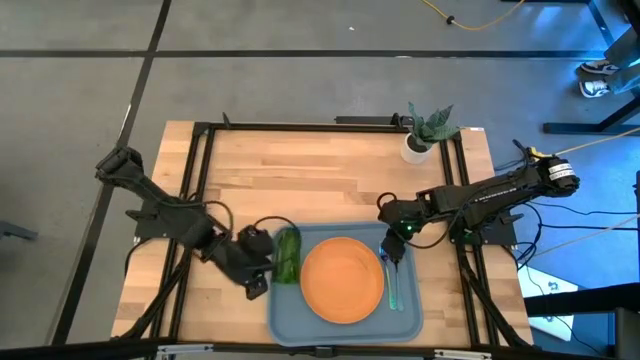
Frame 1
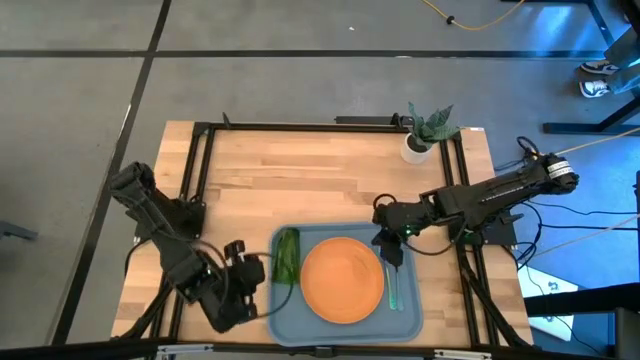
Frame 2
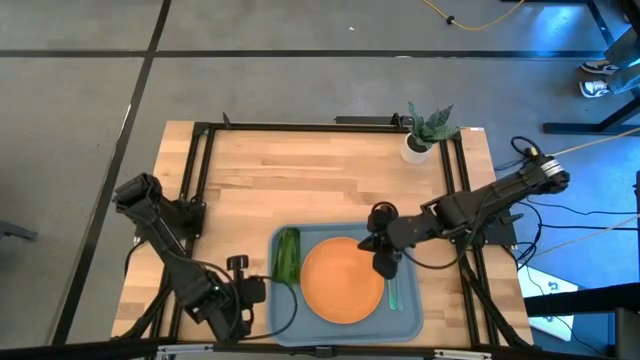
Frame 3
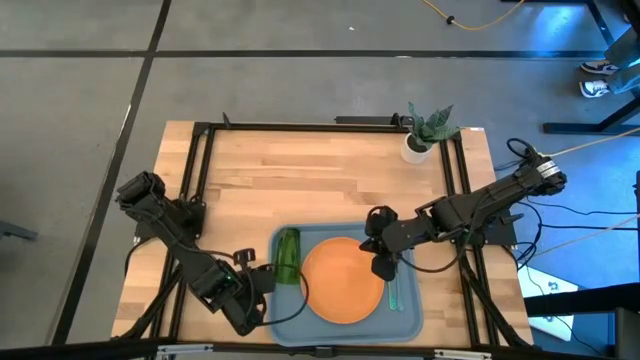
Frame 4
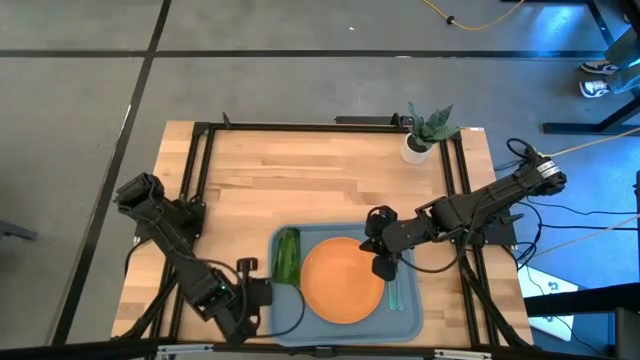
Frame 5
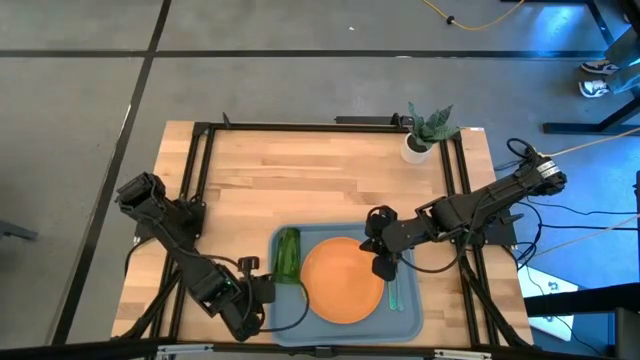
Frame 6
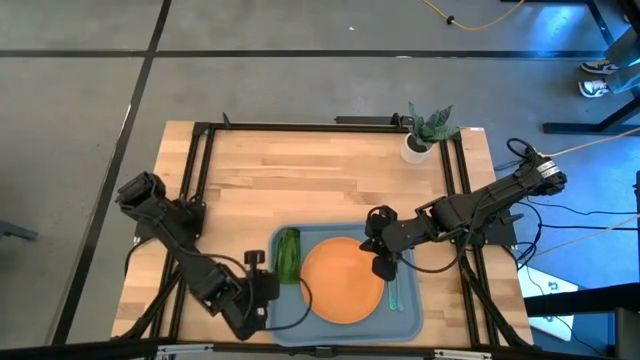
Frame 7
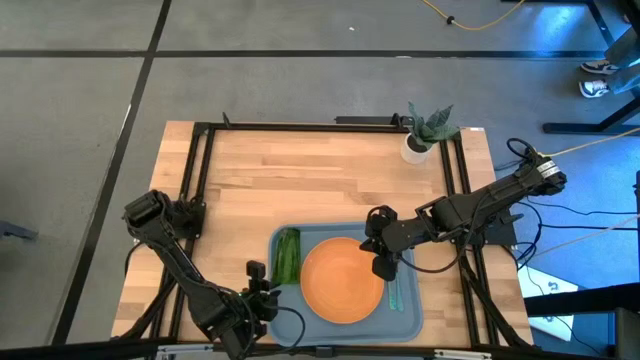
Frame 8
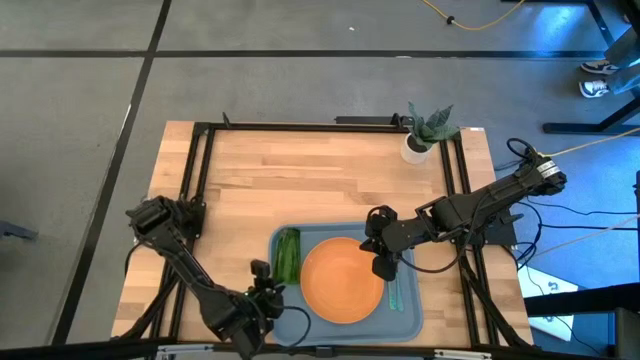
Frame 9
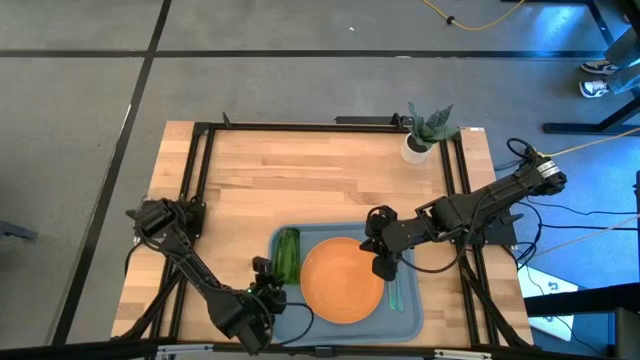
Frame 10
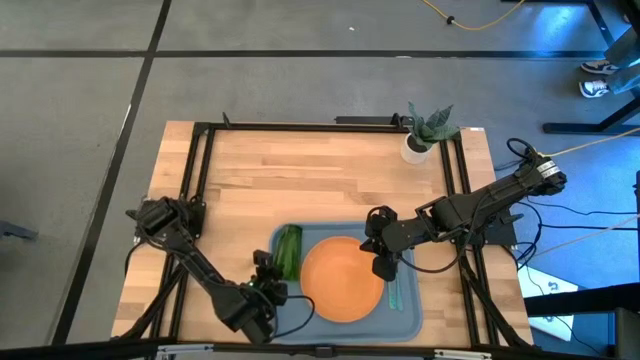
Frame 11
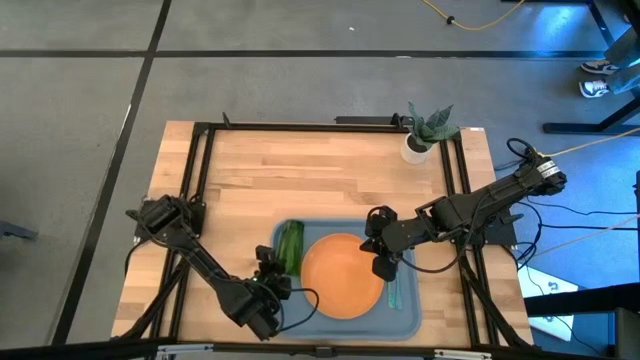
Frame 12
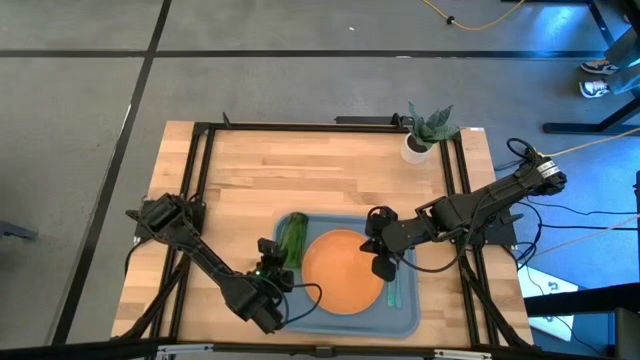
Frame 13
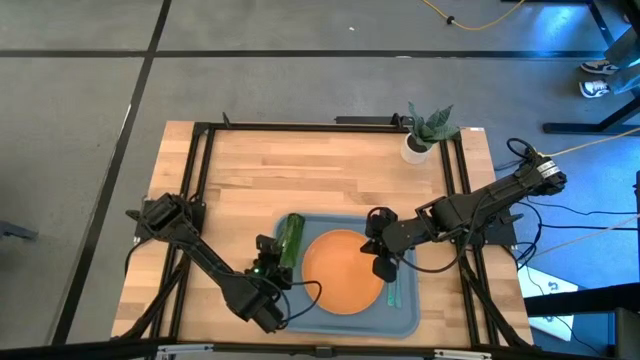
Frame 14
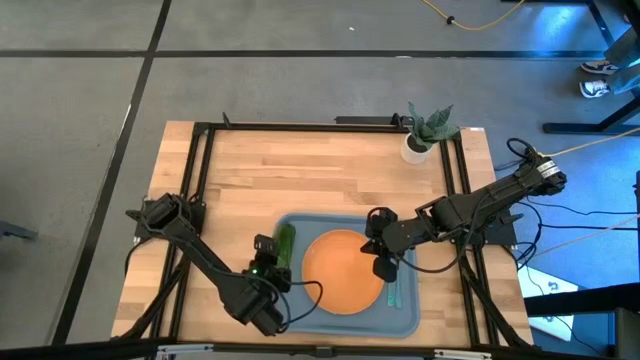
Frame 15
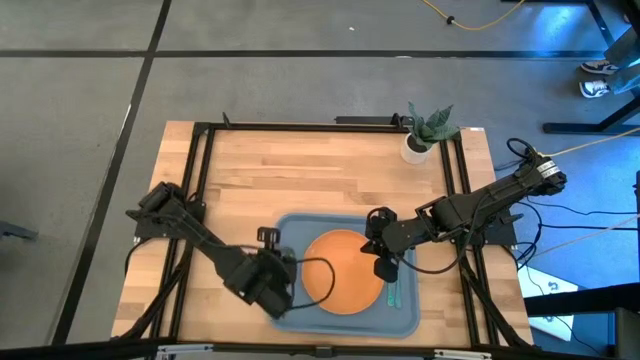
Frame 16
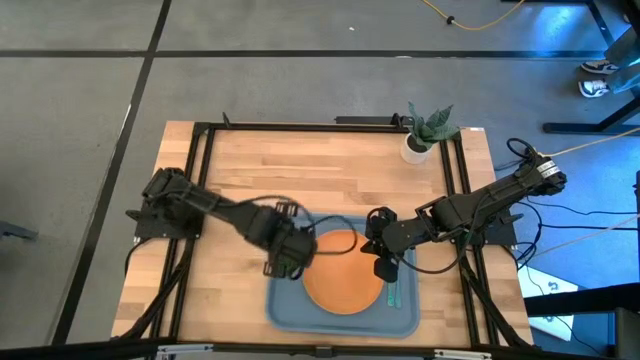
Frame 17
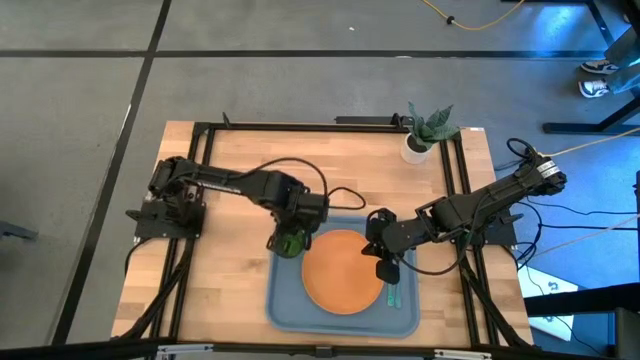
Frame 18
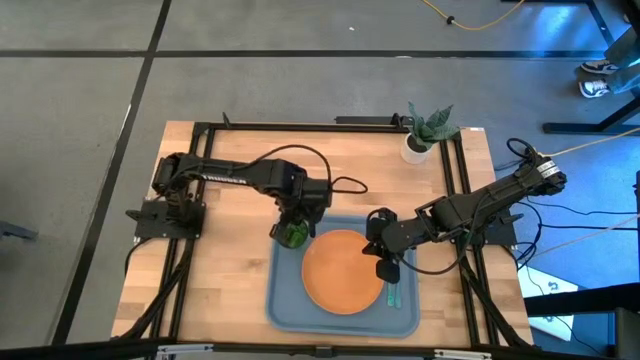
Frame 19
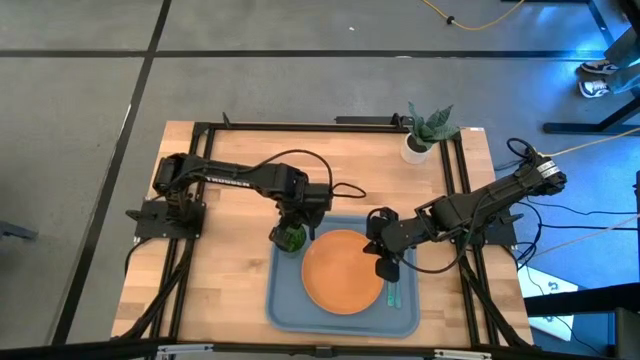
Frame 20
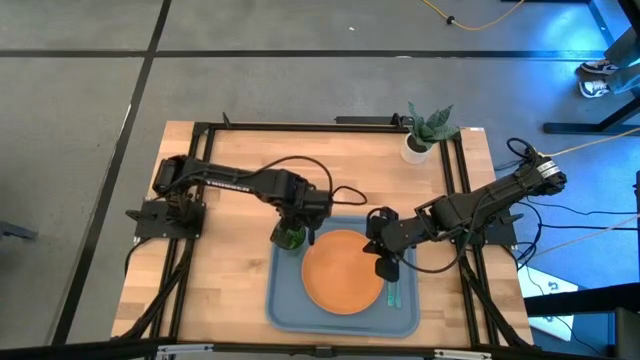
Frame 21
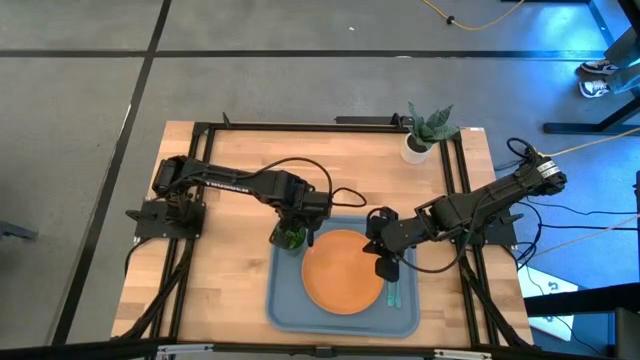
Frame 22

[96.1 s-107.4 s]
Task: Pick and place plate/cup/fork/spoon on tray
Adjust the green cup

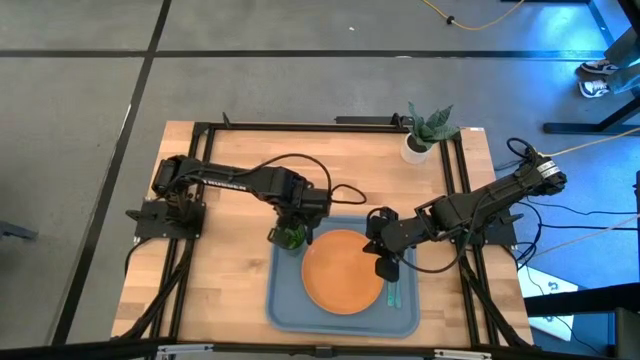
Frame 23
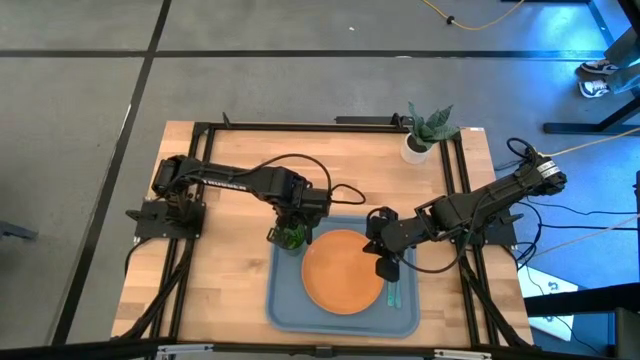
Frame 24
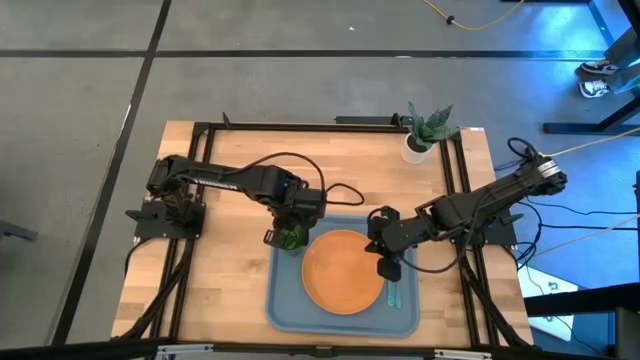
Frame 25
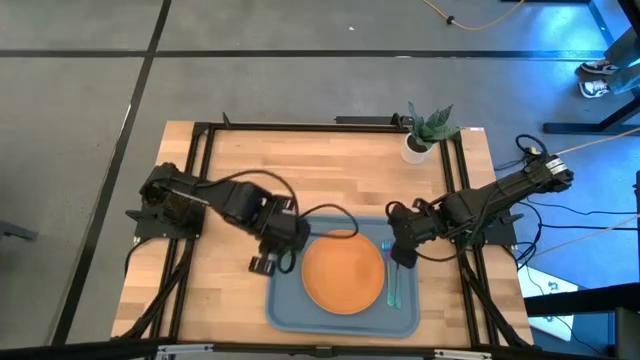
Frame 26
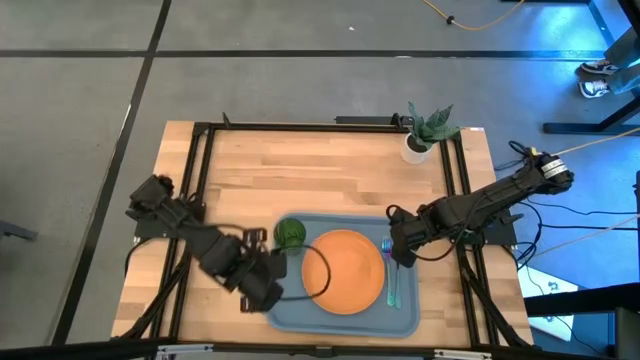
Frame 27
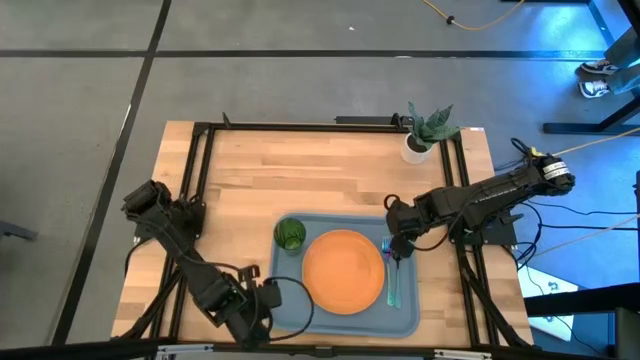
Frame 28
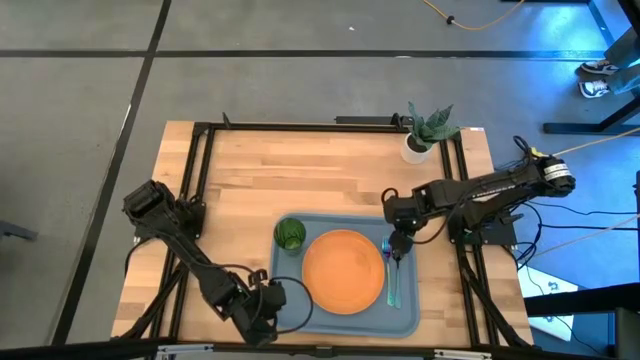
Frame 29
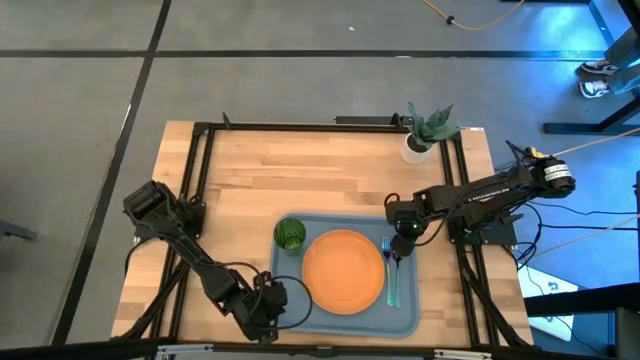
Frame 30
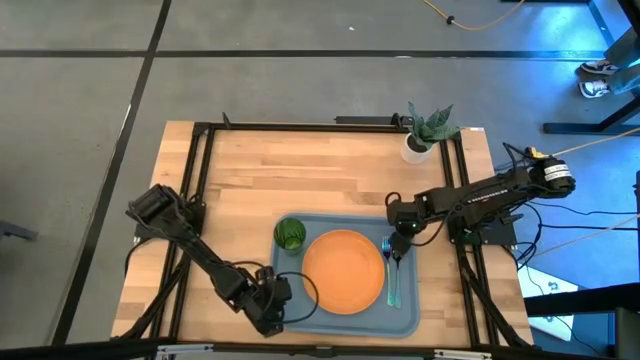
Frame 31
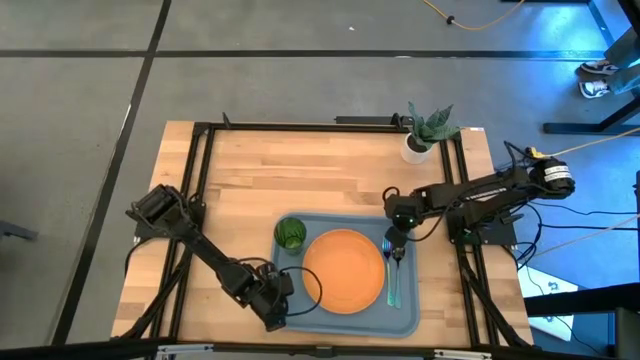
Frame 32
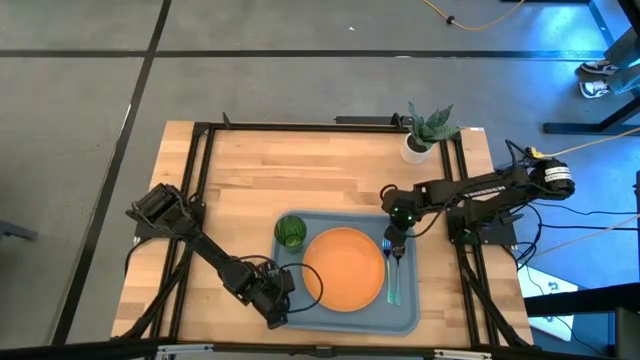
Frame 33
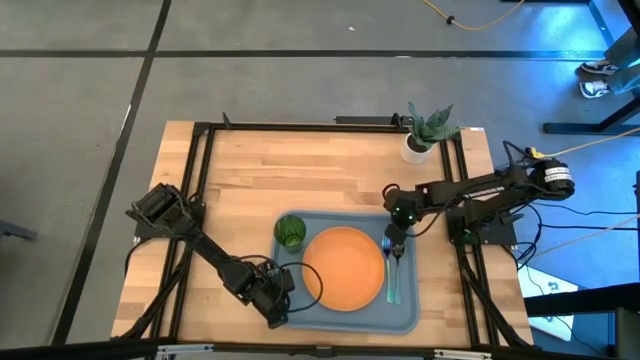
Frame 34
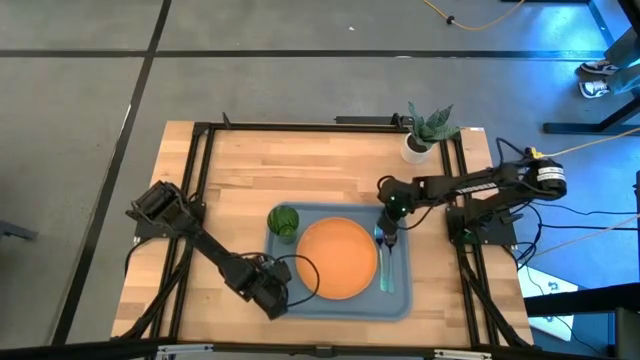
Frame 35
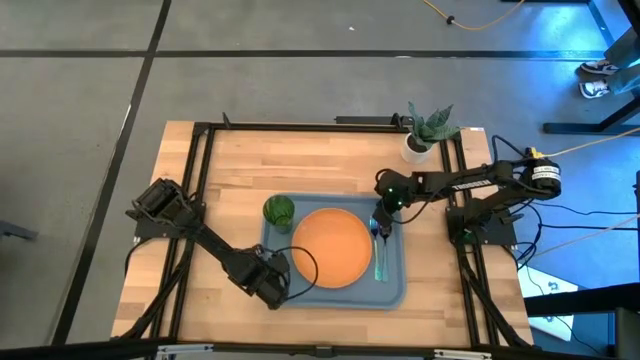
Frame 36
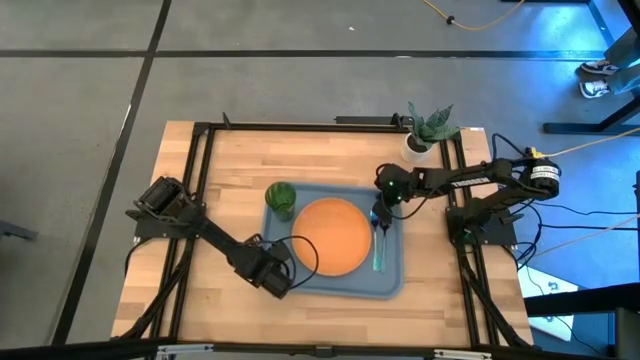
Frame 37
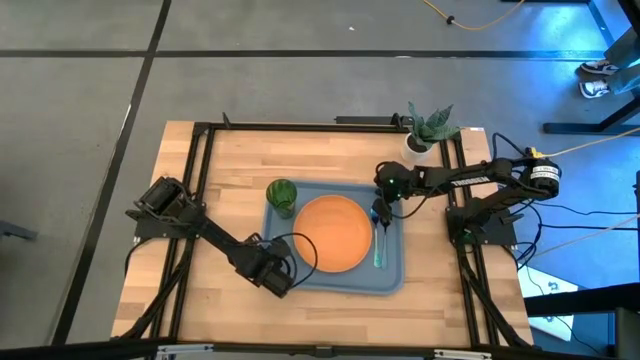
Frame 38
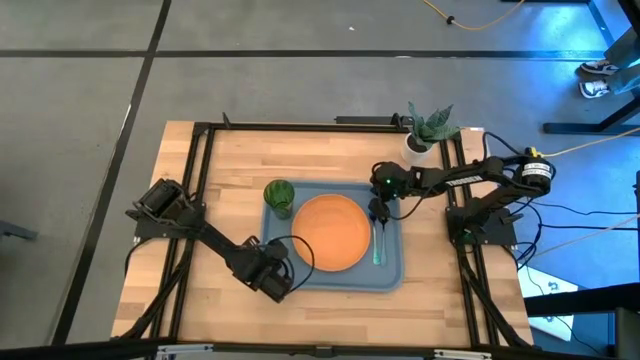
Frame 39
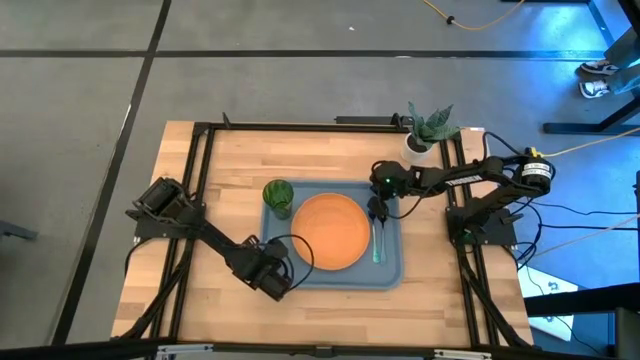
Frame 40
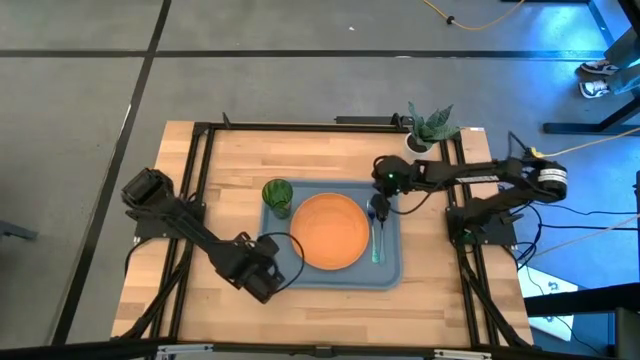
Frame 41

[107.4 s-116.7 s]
Adjust the gray serving tray

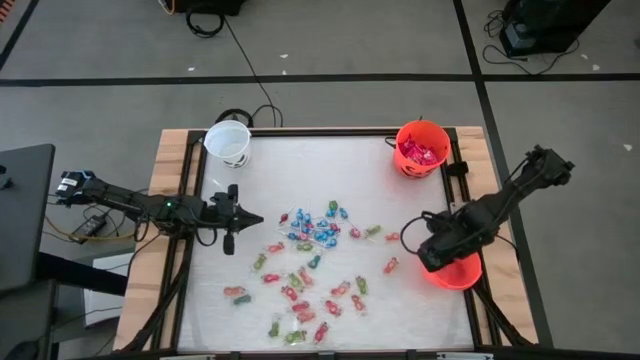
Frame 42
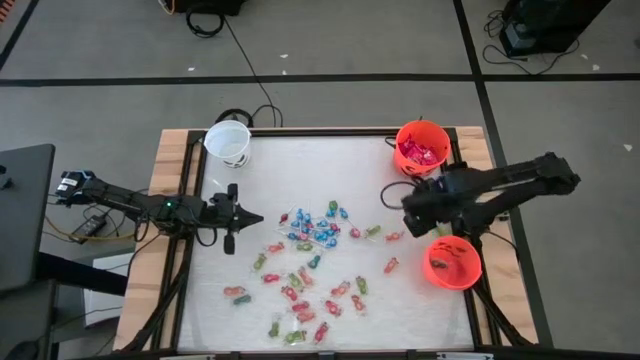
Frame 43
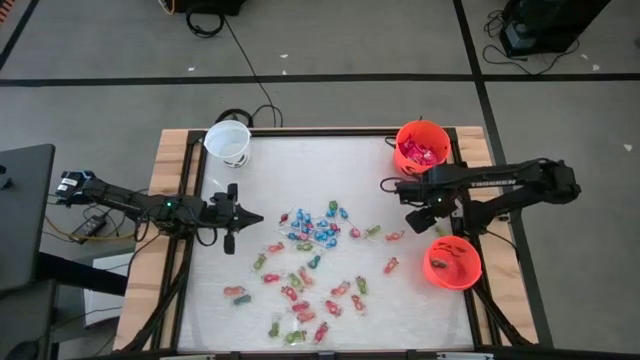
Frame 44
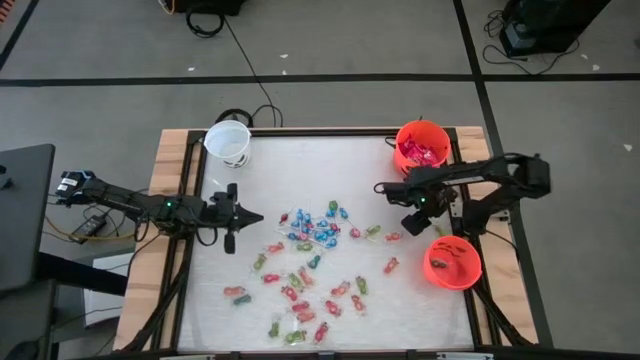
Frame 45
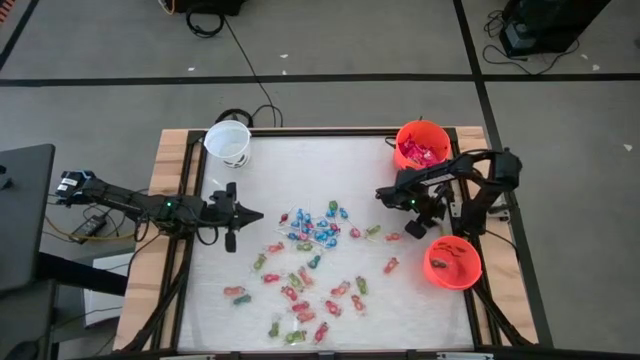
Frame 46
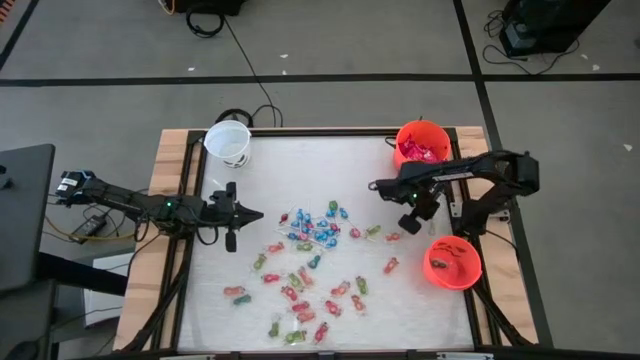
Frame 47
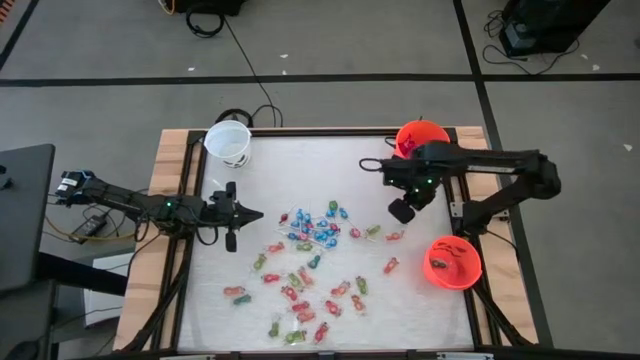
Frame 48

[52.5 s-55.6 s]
Task: Sort candy by brand, put in halloween buckets
Put the green gummy into the bottom orange bucket
